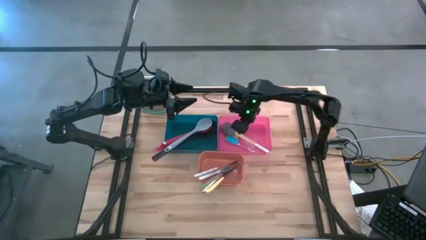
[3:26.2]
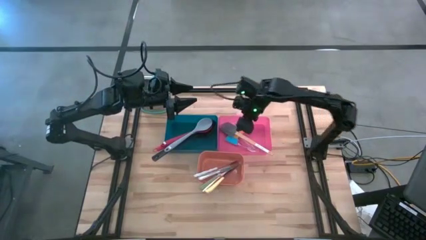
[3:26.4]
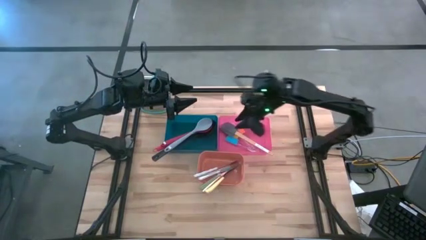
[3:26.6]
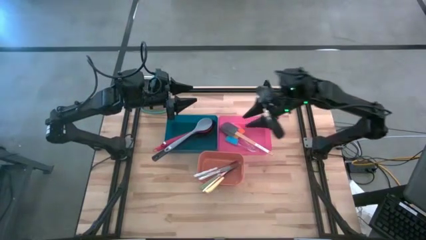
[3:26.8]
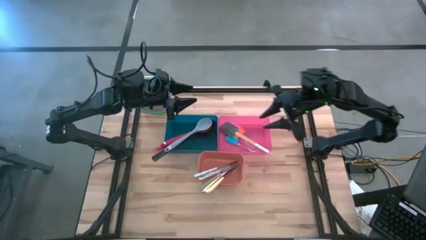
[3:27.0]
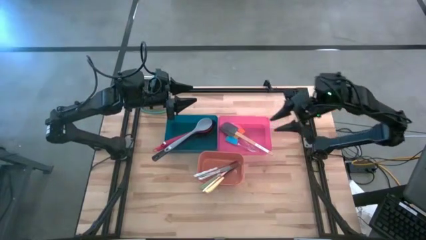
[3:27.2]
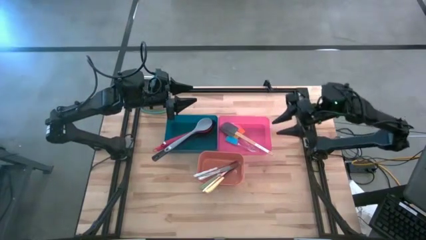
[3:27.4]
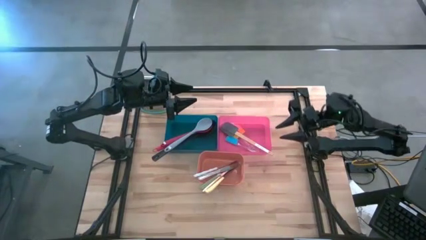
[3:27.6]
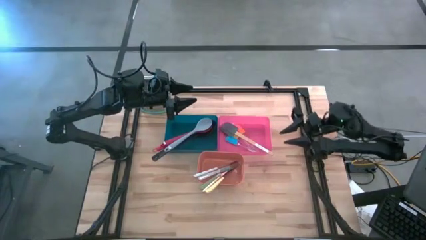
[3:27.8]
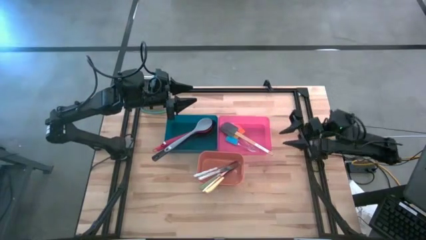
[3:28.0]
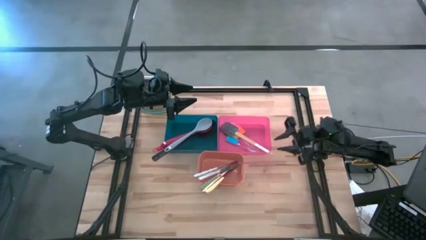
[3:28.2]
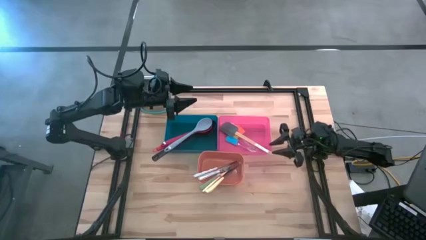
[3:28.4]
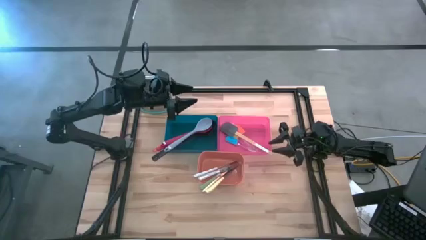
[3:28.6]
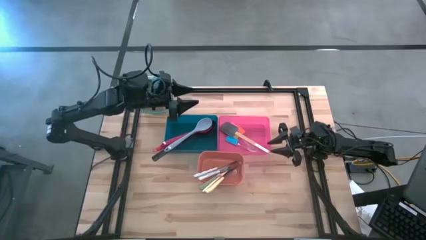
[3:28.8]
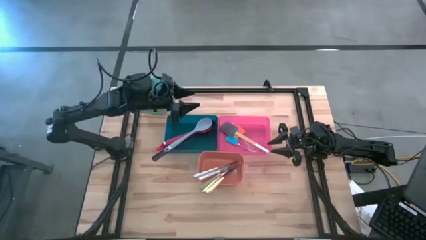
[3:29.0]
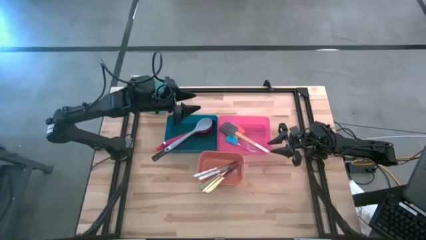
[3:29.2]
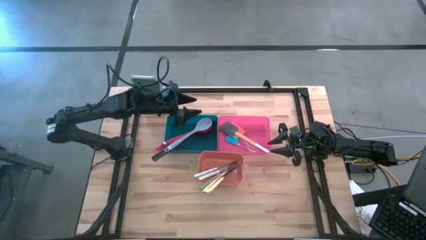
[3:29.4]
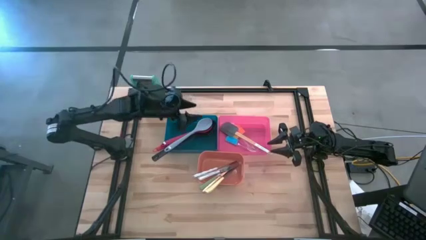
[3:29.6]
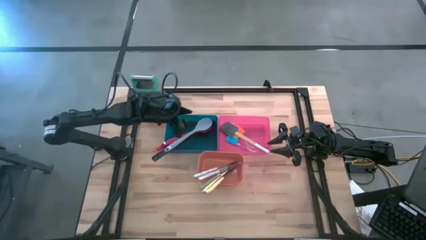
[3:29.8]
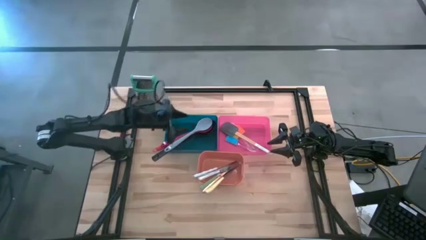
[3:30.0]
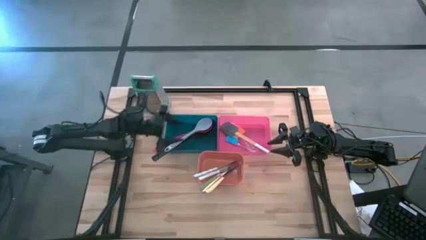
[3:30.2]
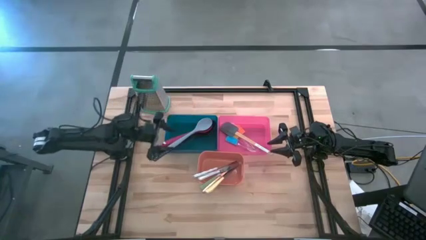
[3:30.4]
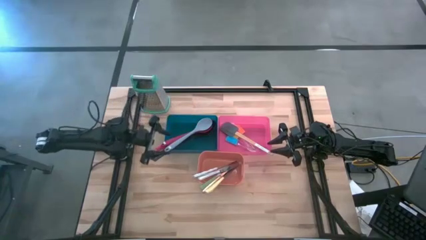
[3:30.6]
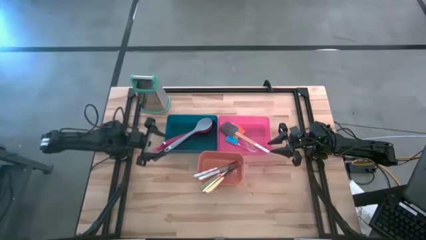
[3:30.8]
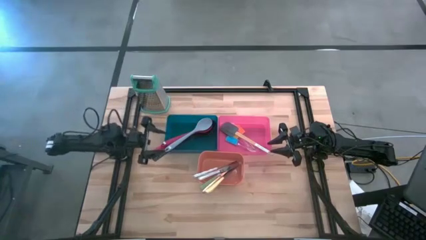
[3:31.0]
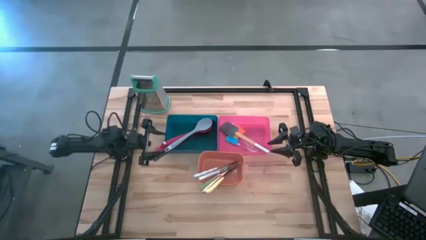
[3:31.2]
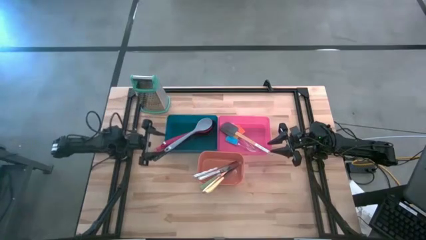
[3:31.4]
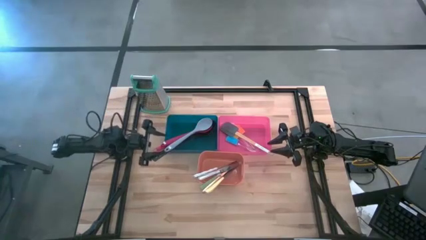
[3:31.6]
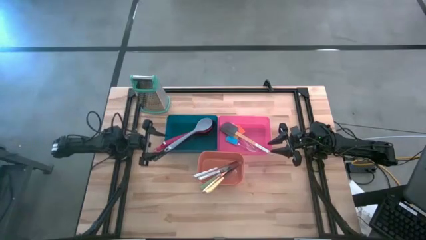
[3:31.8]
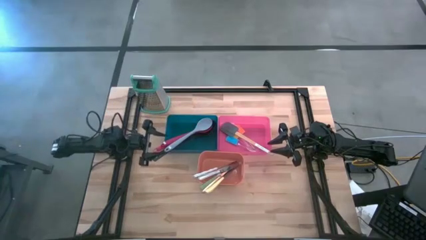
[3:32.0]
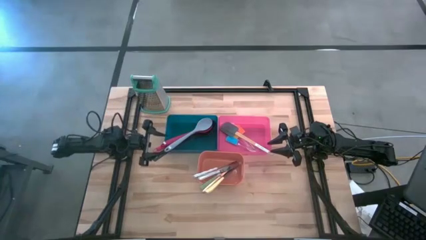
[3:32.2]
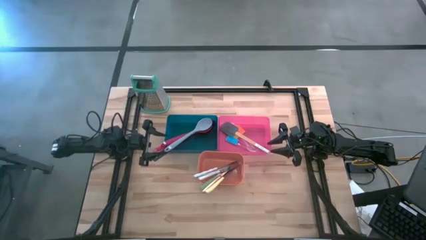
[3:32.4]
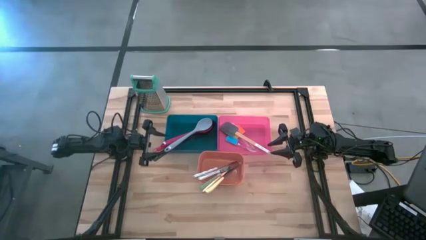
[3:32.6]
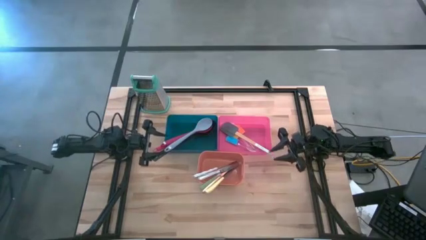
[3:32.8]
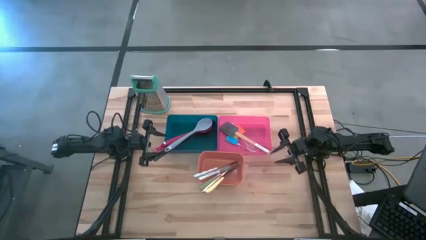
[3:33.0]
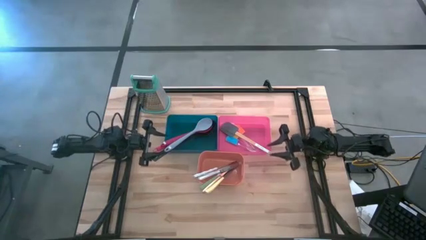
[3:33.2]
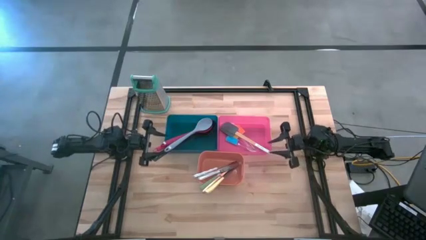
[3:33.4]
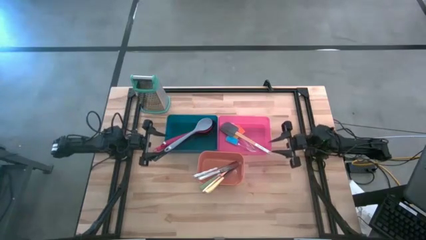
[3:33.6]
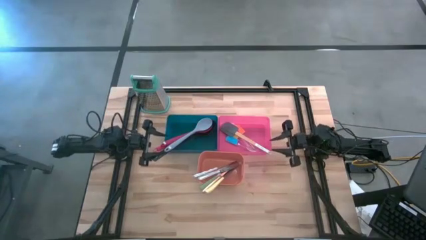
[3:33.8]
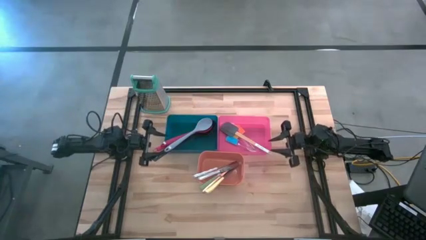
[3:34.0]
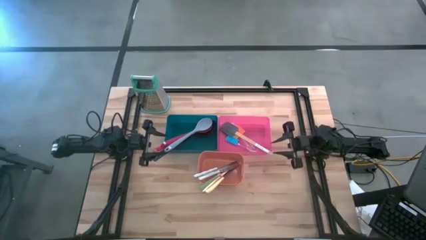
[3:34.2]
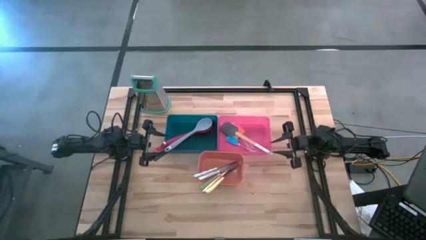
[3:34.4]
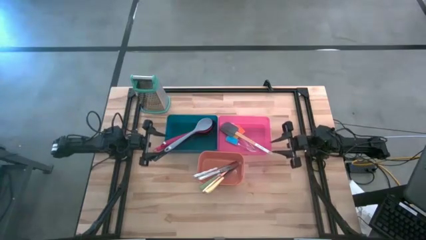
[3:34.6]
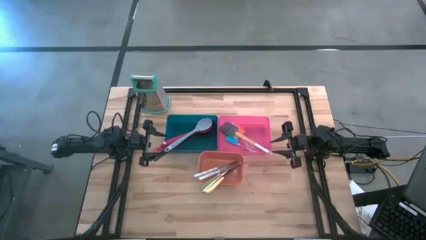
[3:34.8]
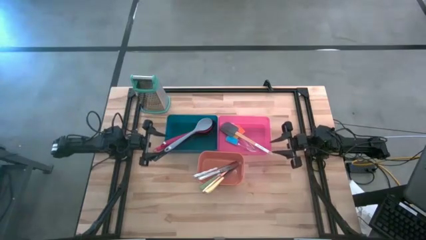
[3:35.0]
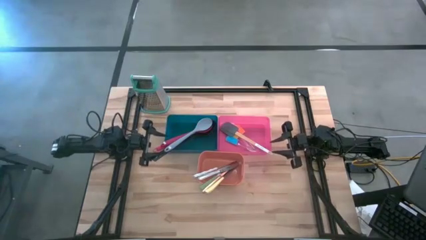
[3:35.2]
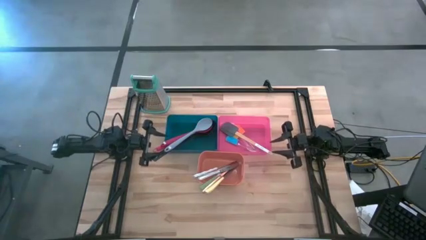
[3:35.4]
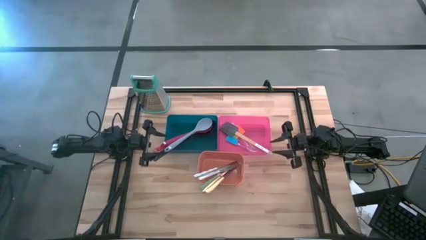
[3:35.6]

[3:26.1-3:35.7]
Task: Pick & Place Kitchen Items
Return to Home Position

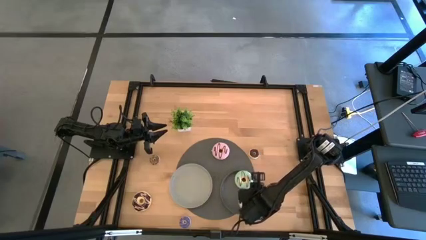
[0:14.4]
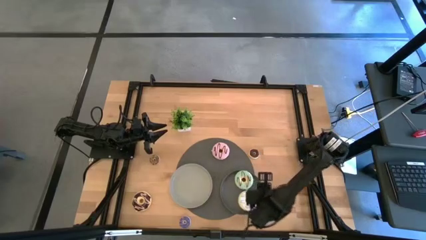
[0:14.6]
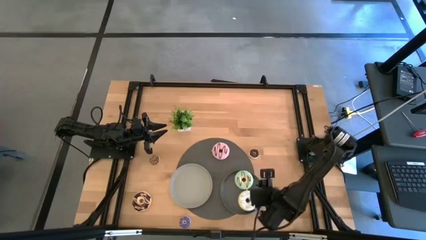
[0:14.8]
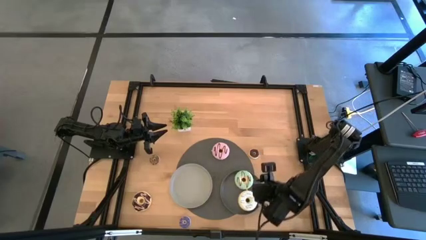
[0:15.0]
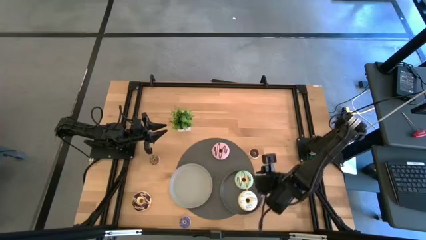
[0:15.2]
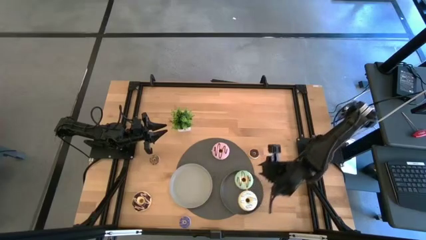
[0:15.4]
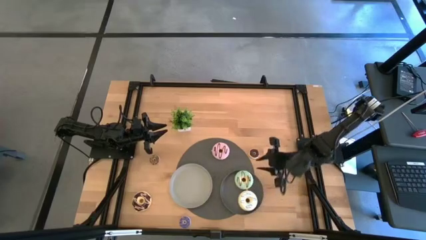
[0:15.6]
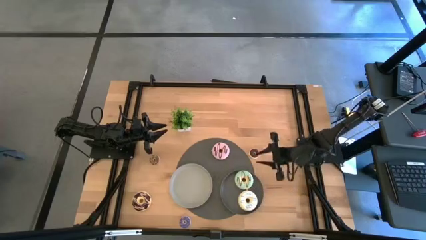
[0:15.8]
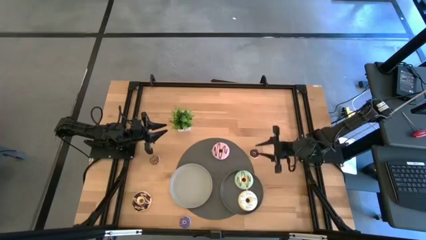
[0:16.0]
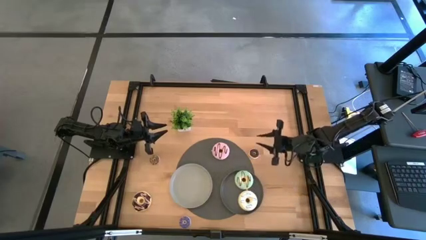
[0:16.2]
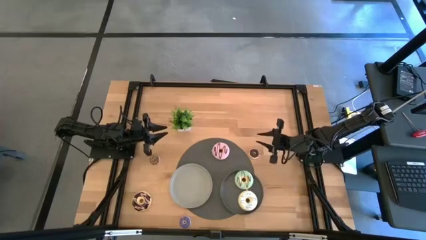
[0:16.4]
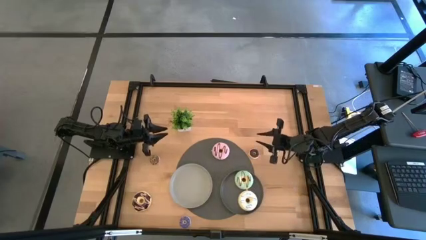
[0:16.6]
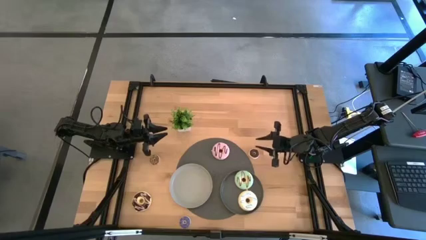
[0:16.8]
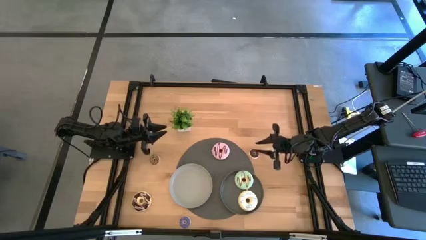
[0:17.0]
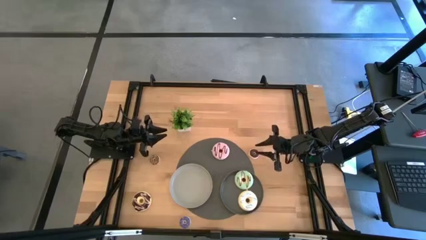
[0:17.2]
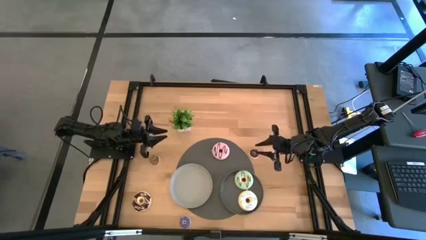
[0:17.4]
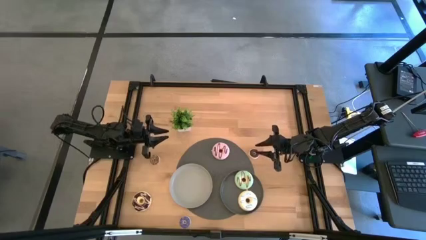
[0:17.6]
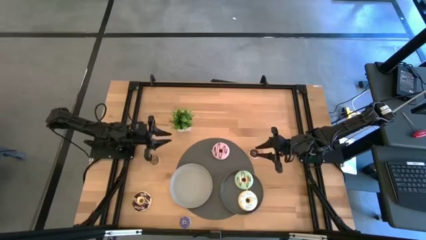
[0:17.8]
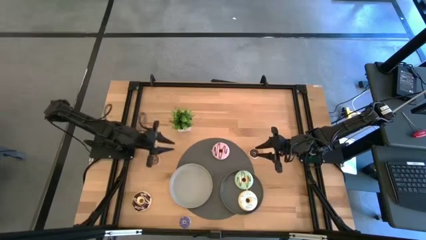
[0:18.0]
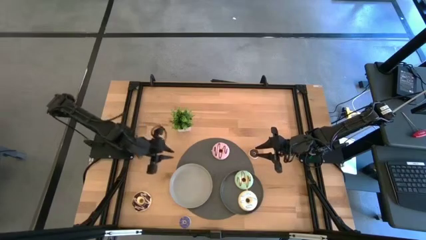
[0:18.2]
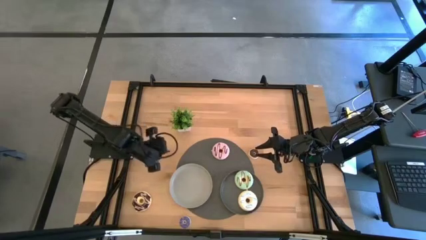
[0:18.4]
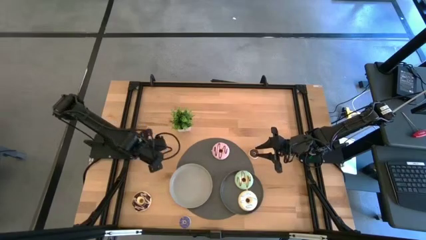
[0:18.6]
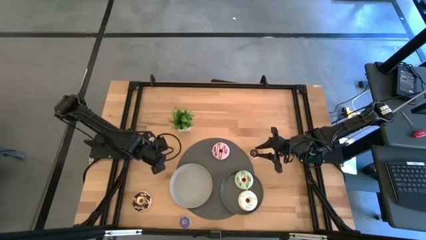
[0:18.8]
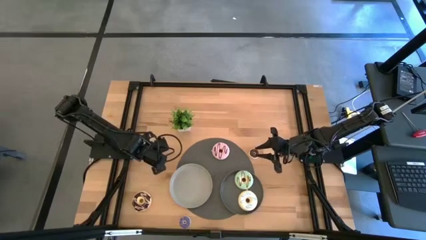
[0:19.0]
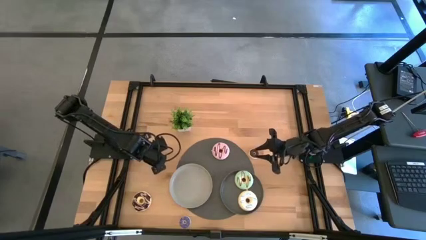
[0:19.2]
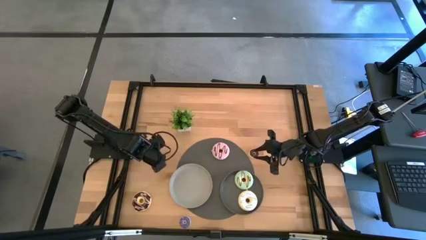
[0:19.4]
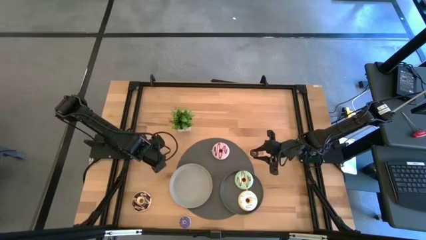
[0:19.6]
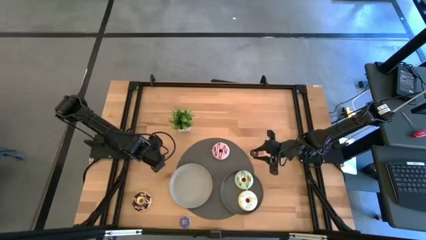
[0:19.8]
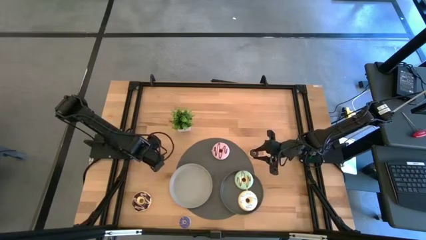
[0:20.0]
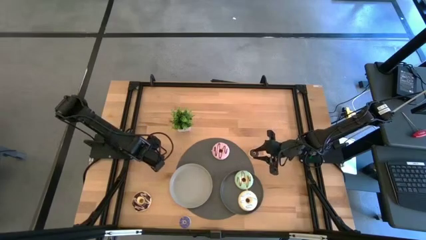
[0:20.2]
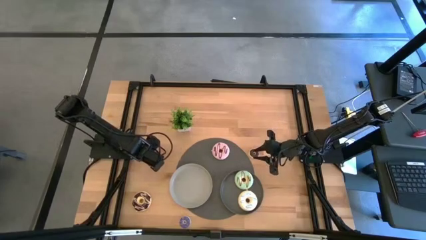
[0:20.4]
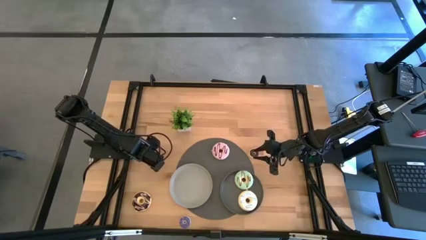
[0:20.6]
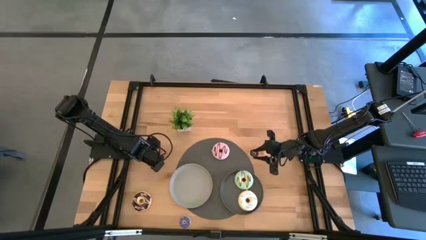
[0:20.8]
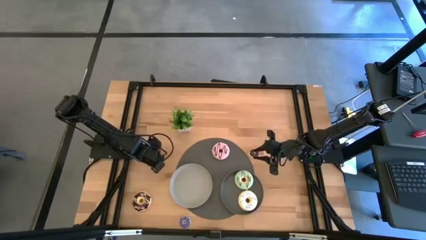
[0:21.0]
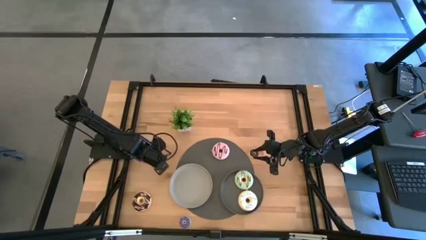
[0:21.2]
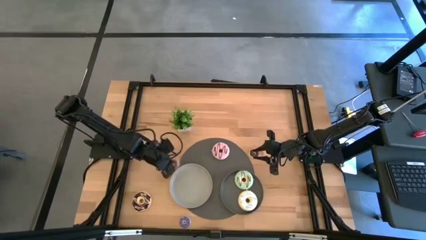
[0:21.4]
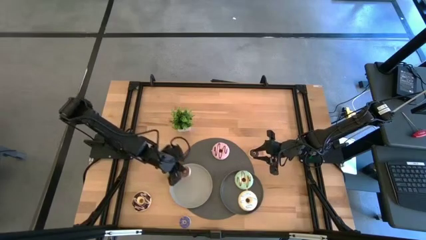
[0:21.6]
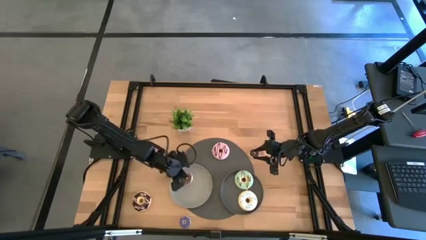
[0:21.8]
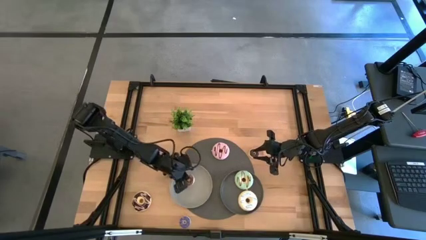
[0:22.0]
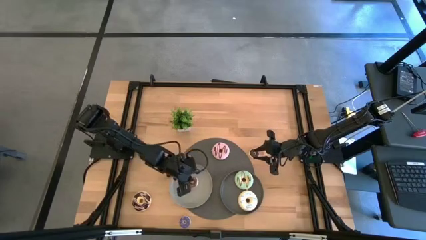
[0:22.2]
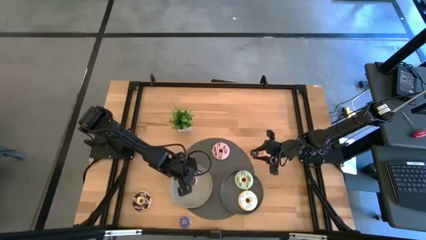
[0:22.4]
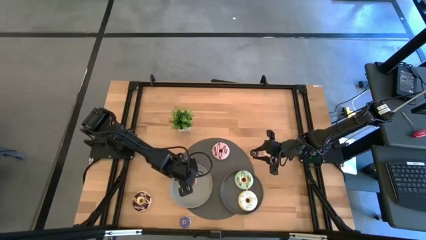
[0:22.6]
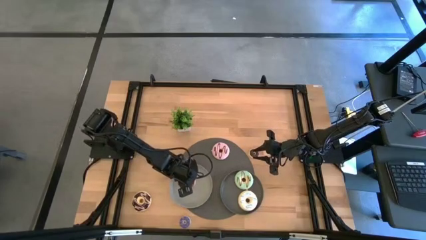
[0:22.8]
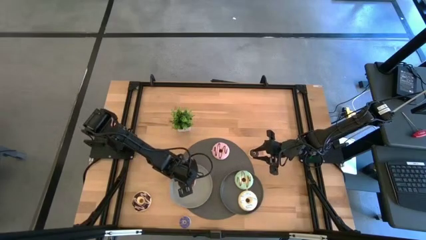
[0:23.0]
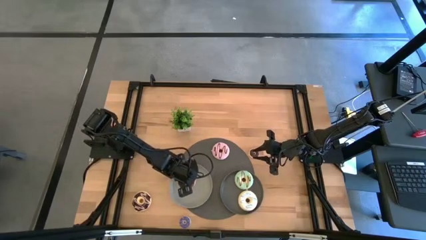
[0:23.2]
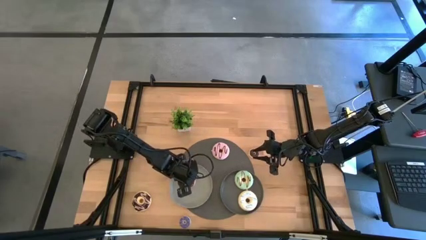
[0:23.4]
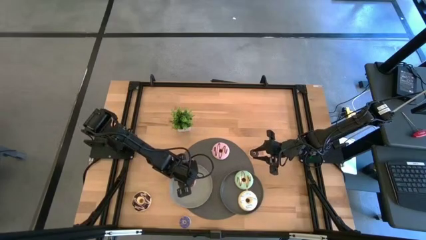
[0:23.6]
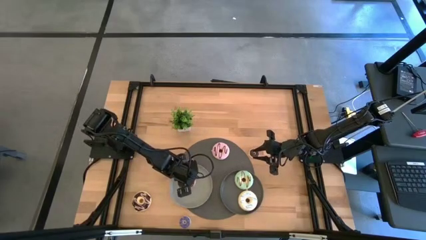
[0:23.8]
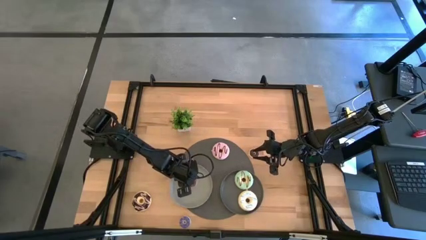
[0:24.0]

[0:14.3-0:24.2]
Task: Pick & Place donuts
Put the small brown donut on the light grey plate
